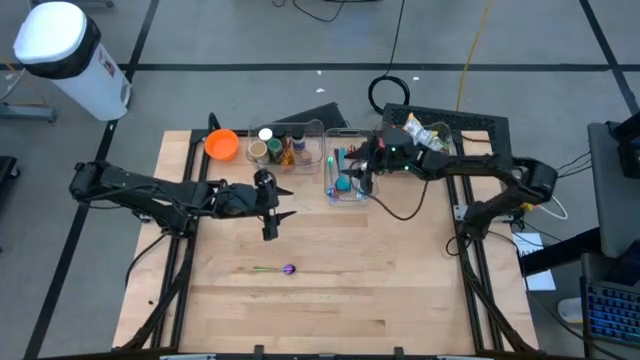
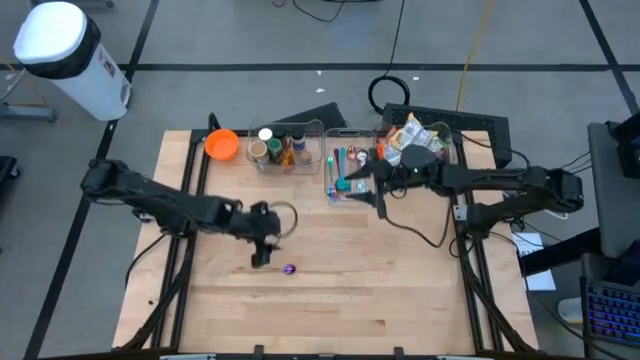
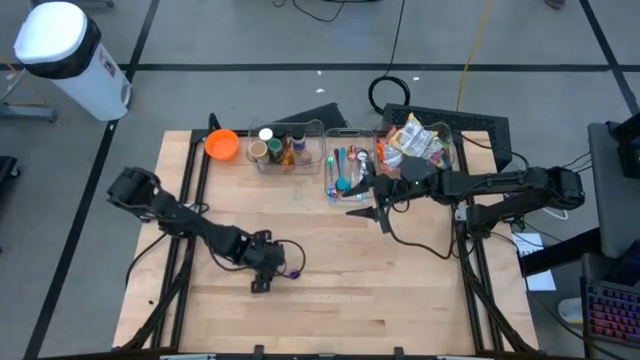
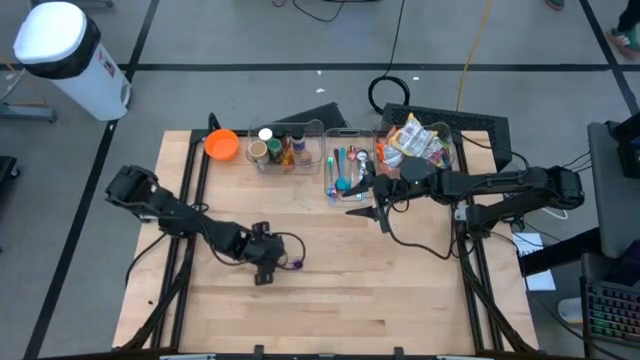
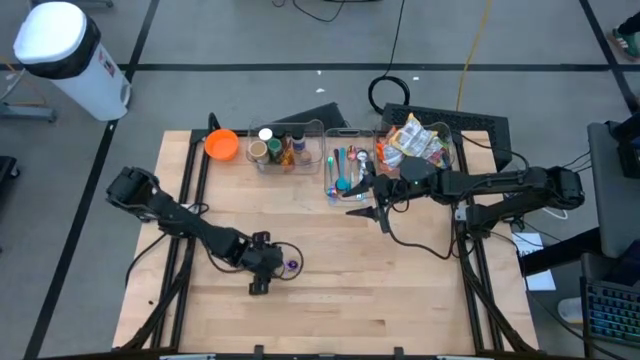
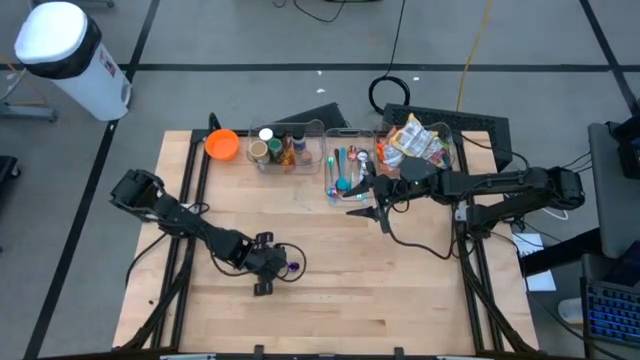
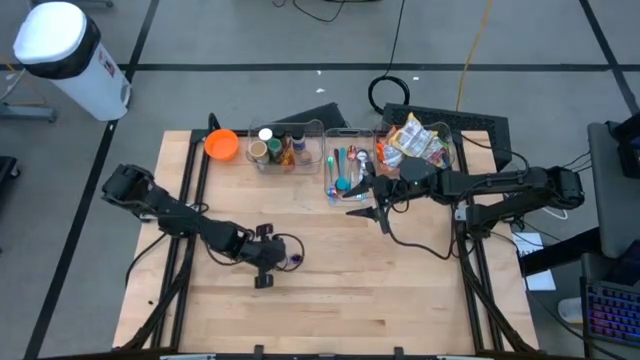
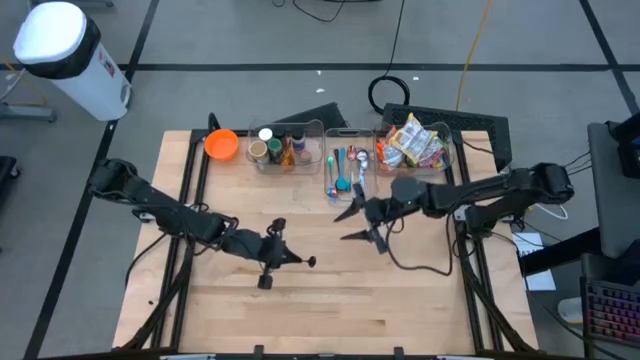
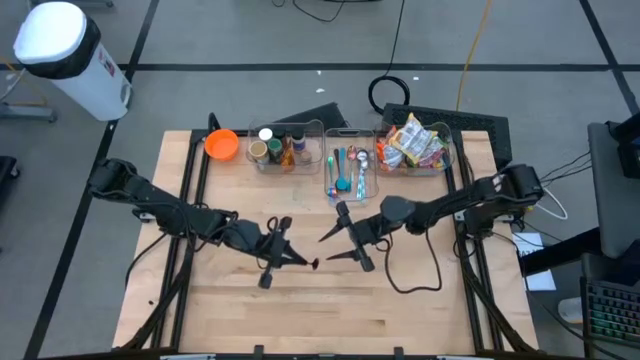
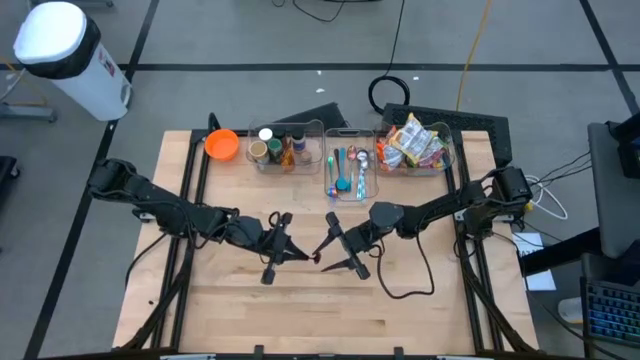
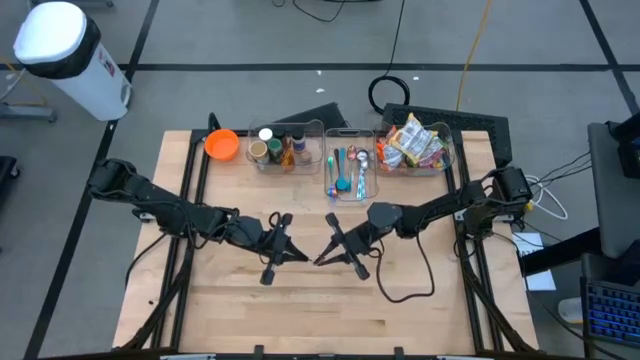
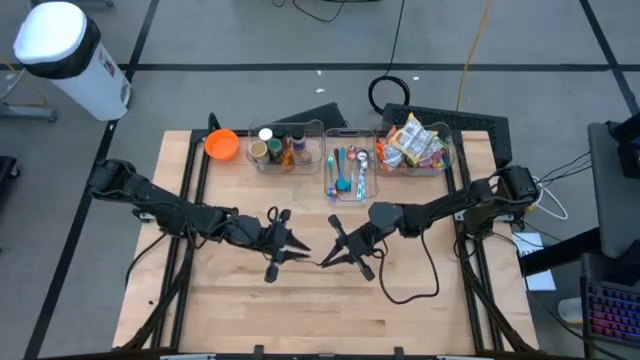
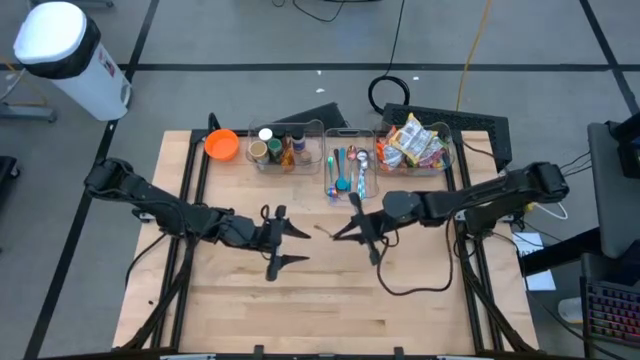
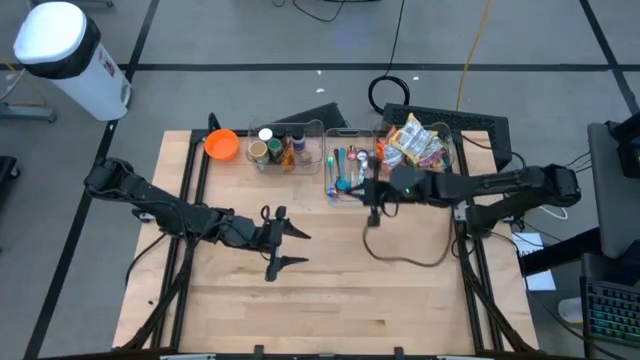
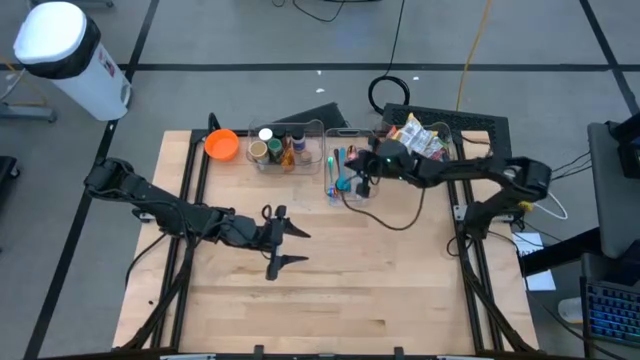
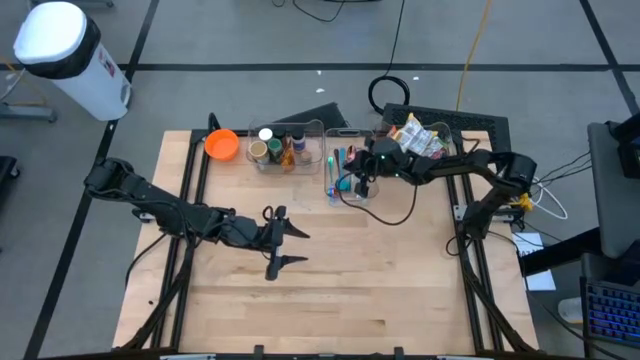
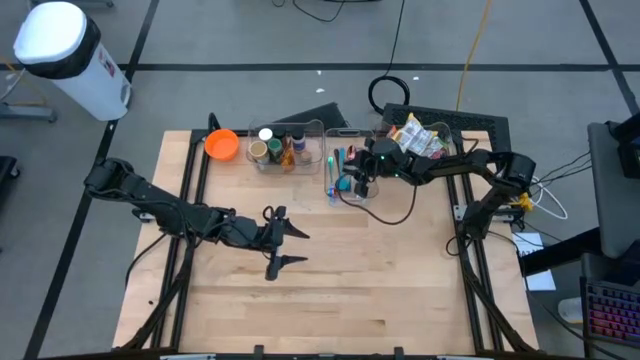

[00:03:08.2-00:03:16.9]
Task: Pick & Place Food Item
Put the purple spoon into the center transparent bin

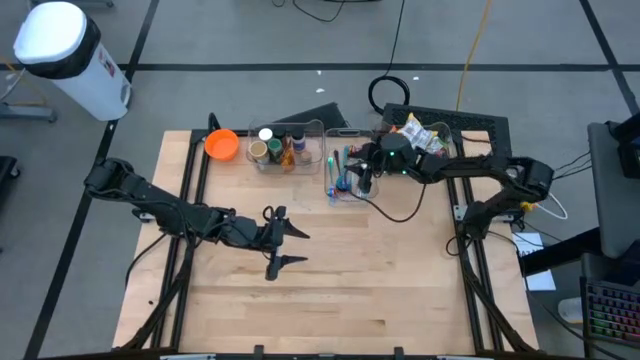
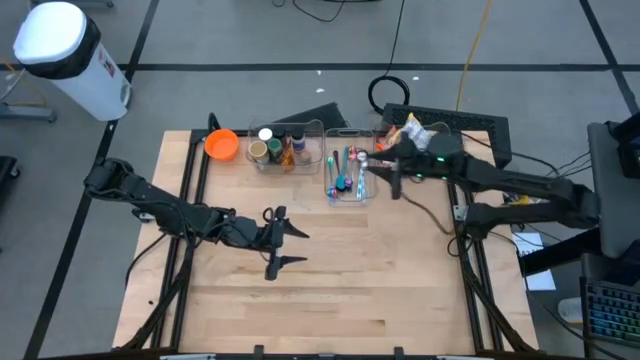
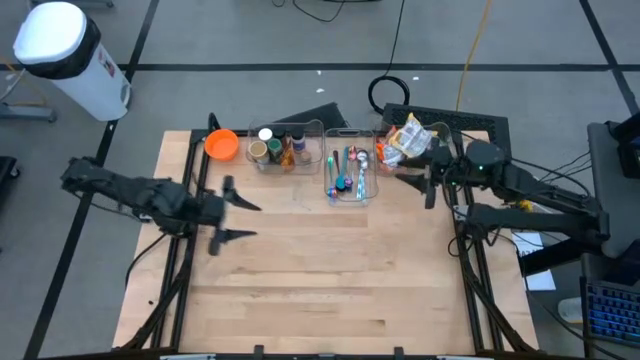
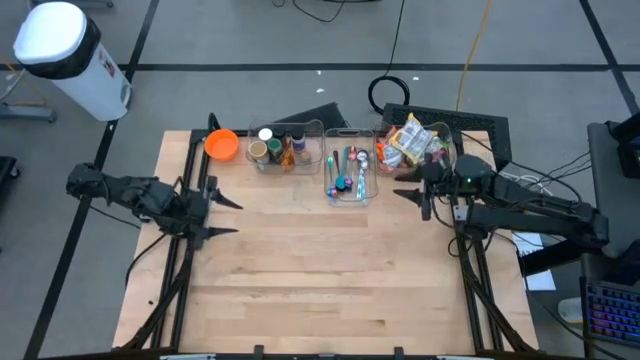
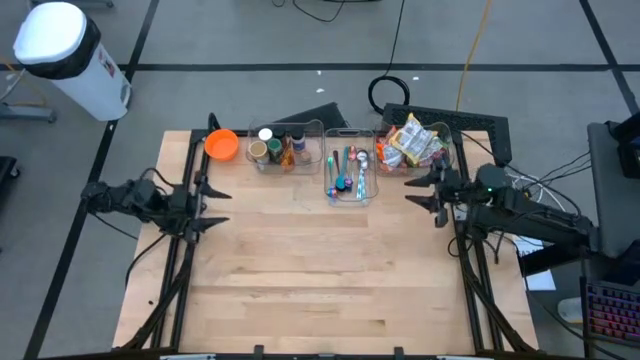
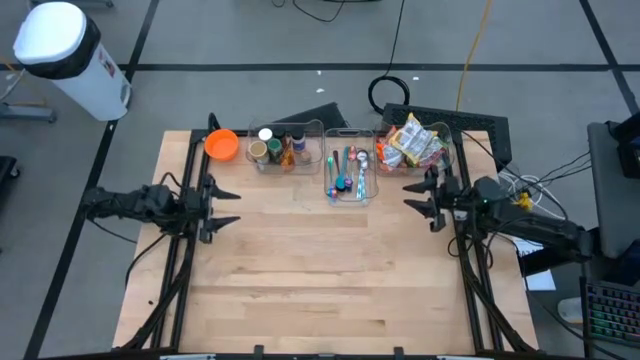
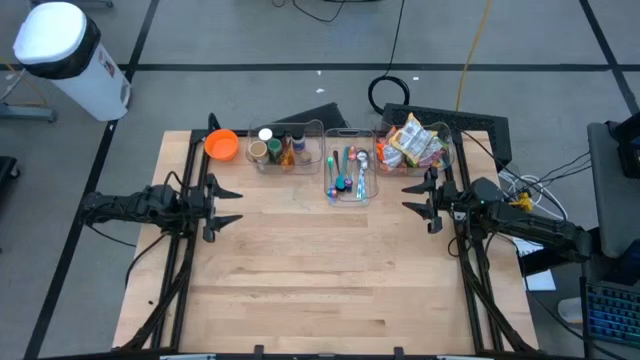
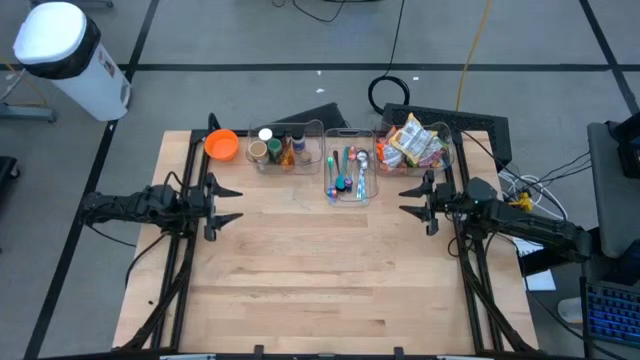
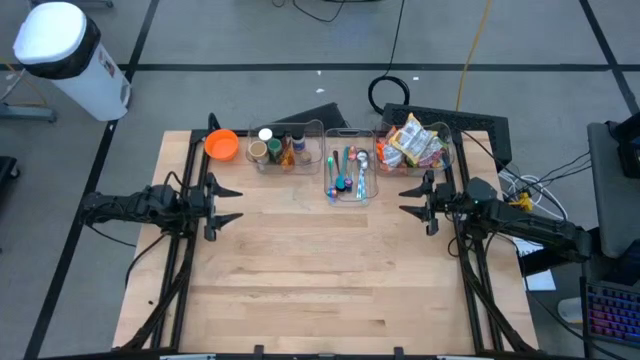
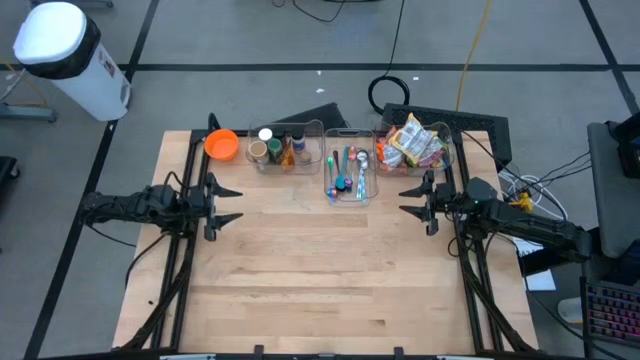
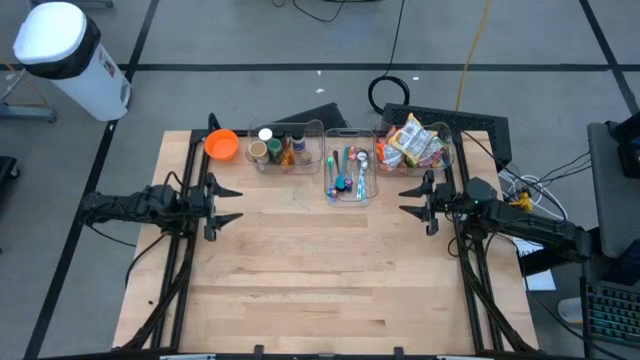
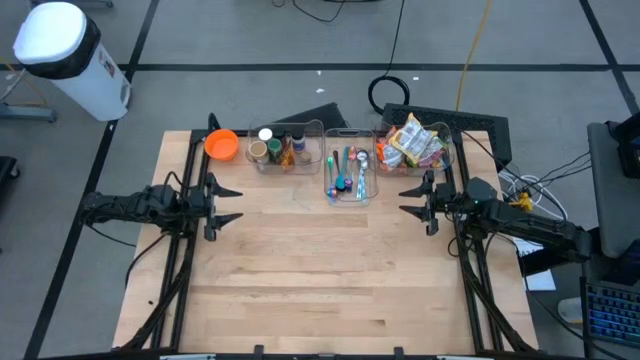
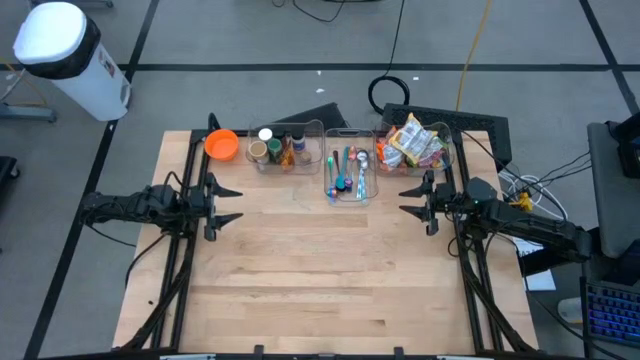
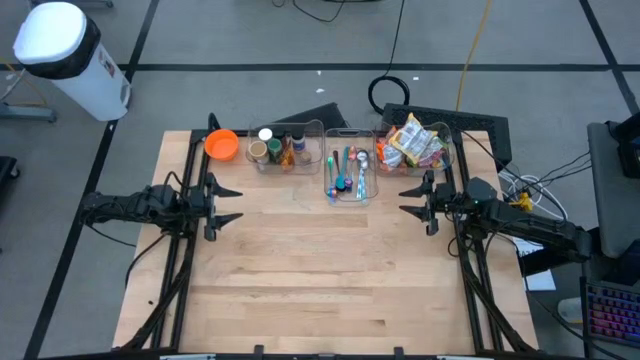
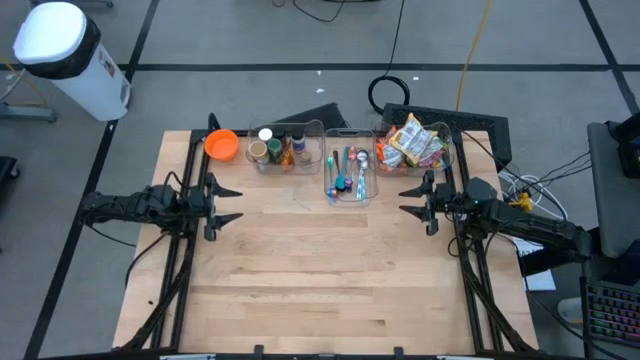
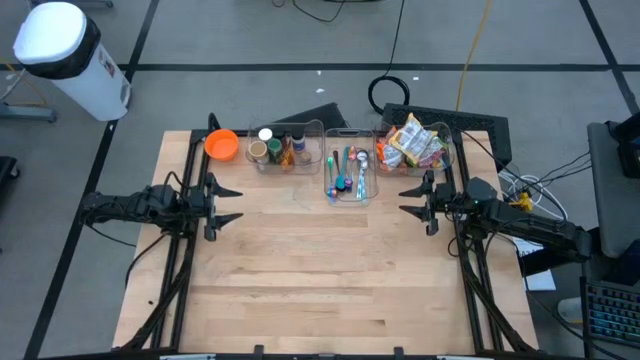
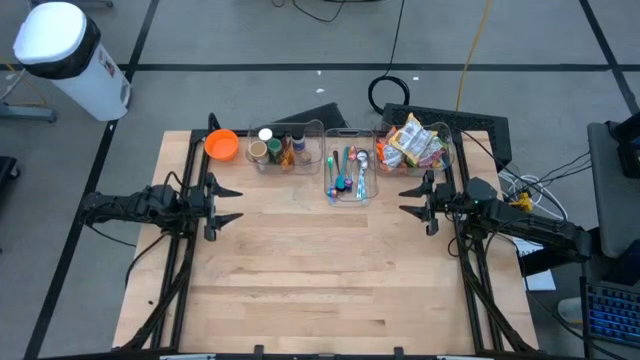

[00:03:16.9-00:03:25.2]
Return to Home Position

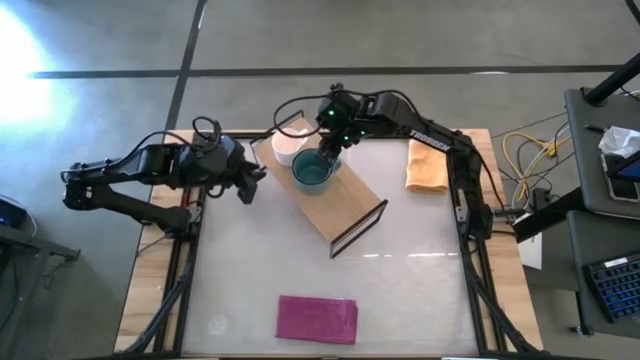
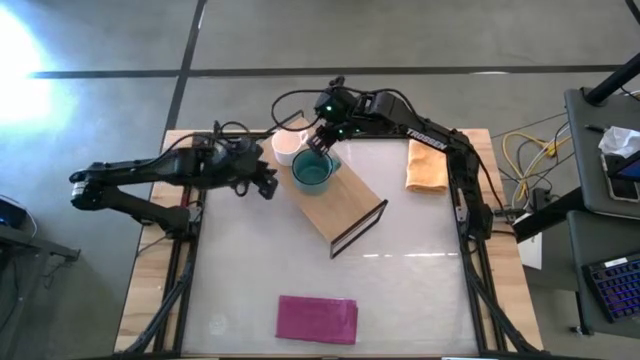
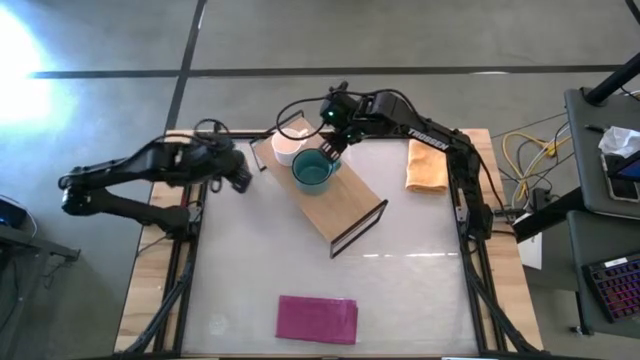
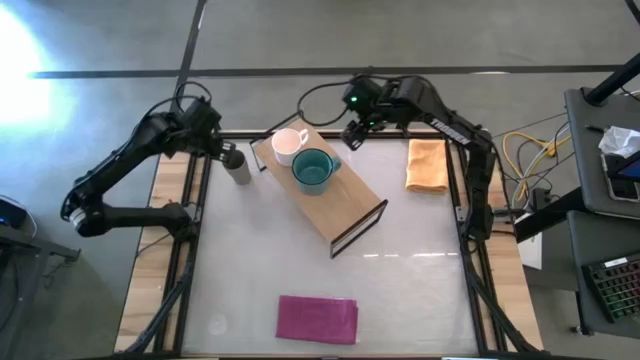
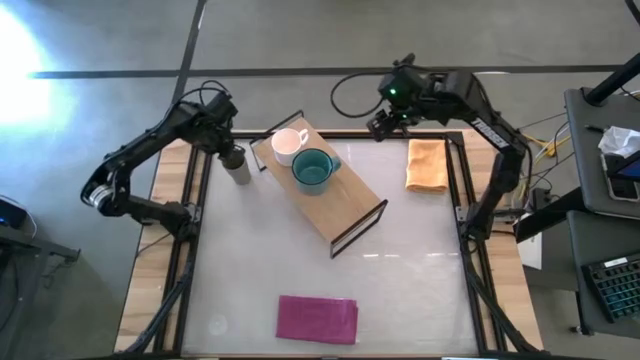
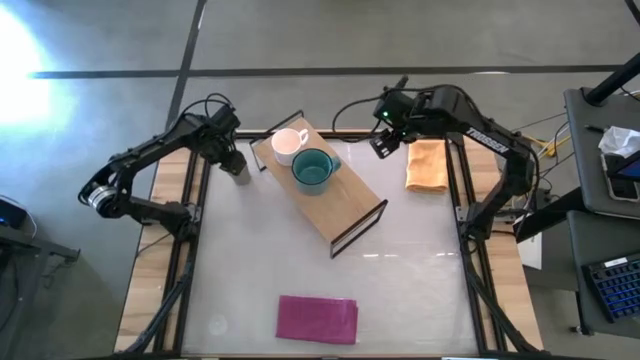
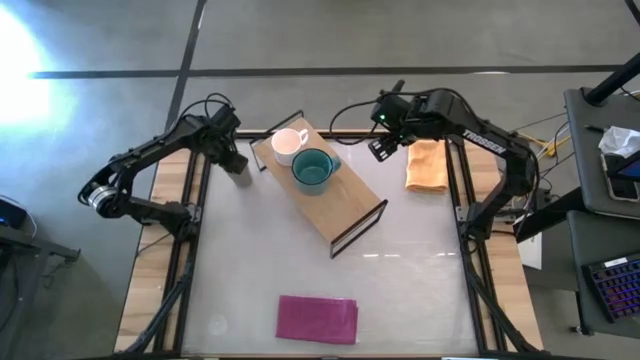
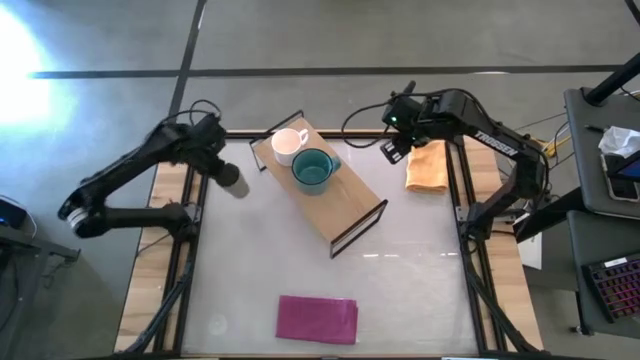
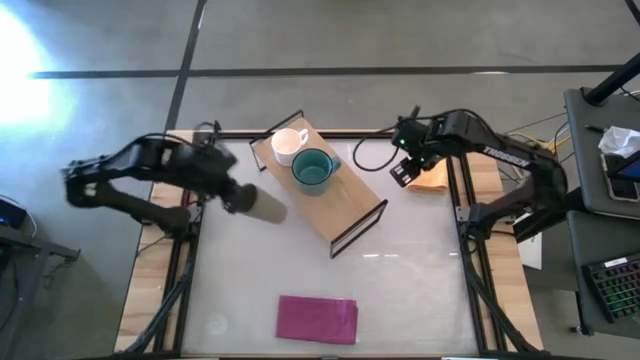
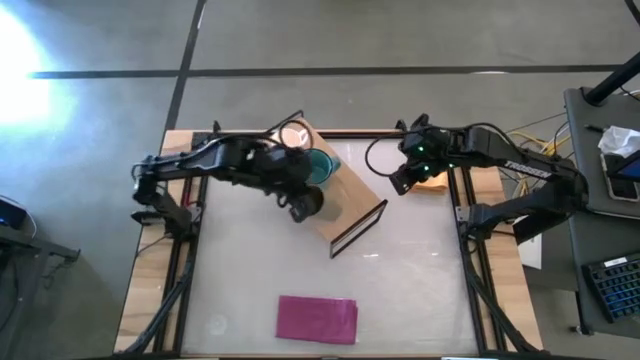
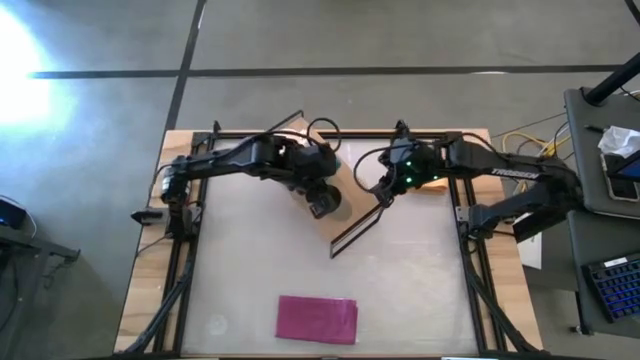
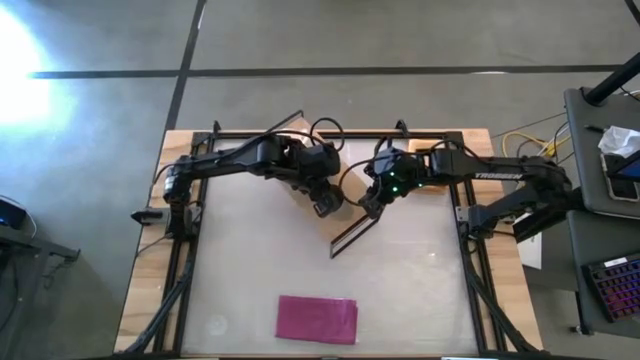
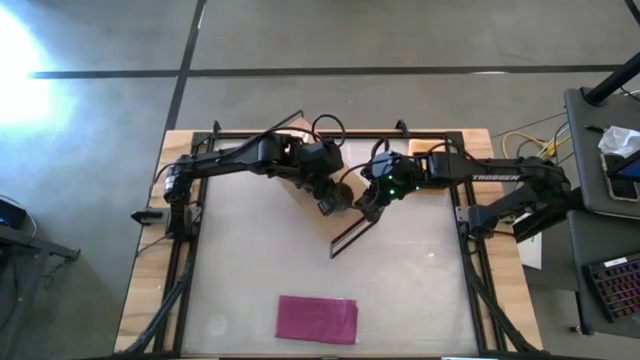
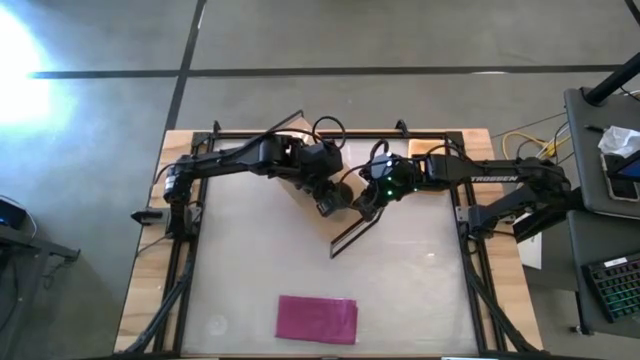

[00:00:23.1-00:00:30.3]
Task: Stack small to large cups/mugs on shelf
Put the gray cup on the shelf
